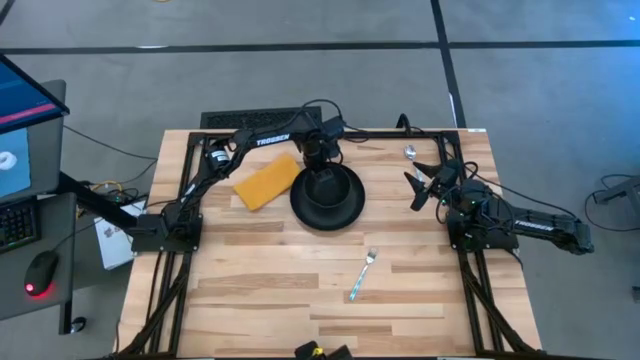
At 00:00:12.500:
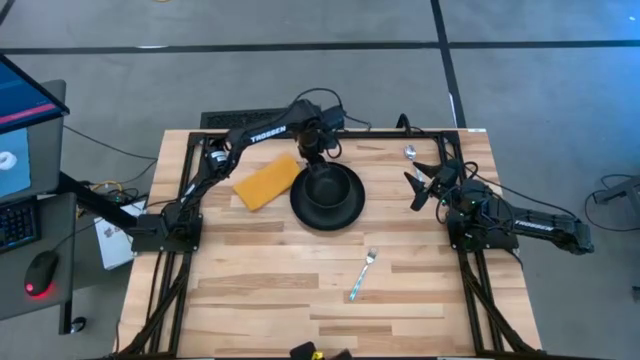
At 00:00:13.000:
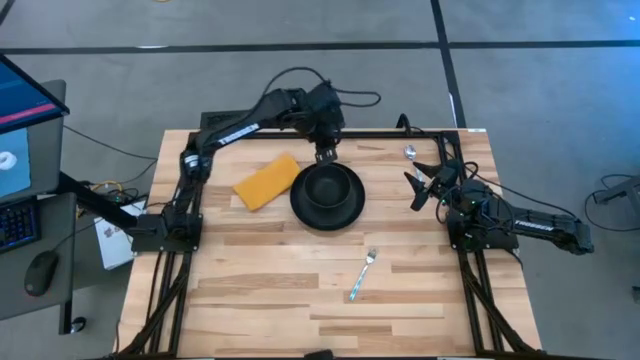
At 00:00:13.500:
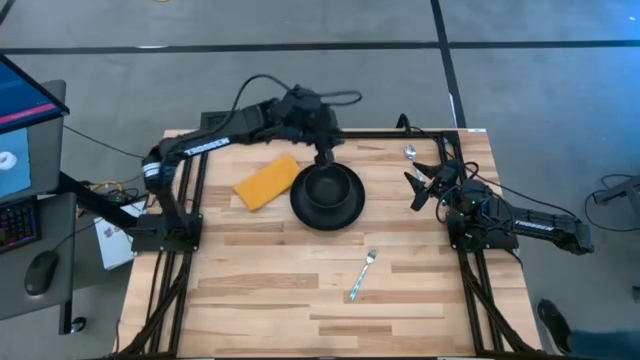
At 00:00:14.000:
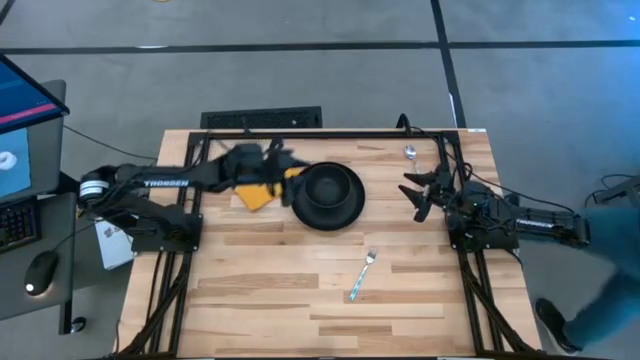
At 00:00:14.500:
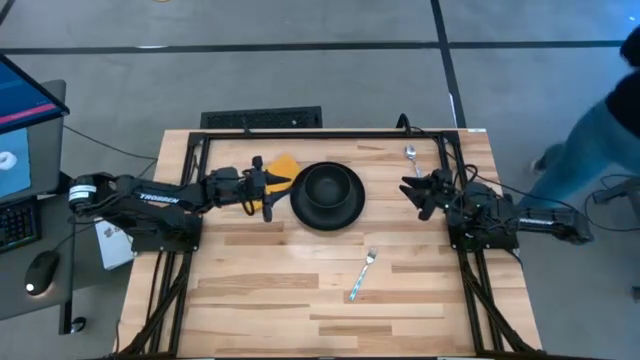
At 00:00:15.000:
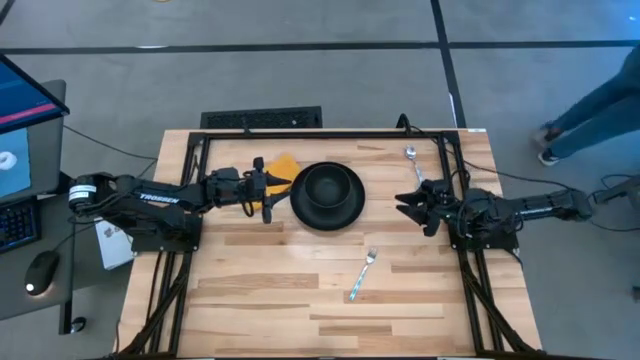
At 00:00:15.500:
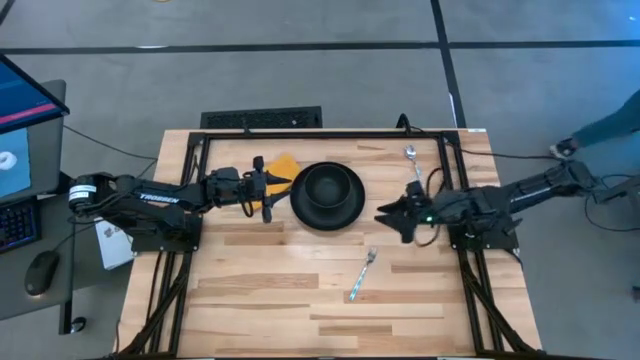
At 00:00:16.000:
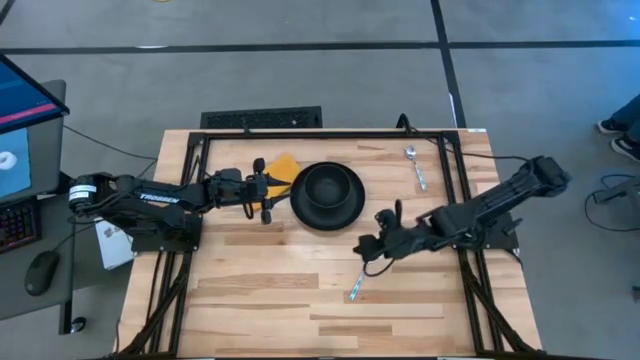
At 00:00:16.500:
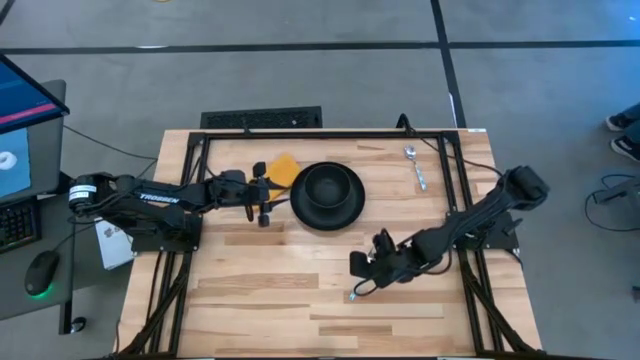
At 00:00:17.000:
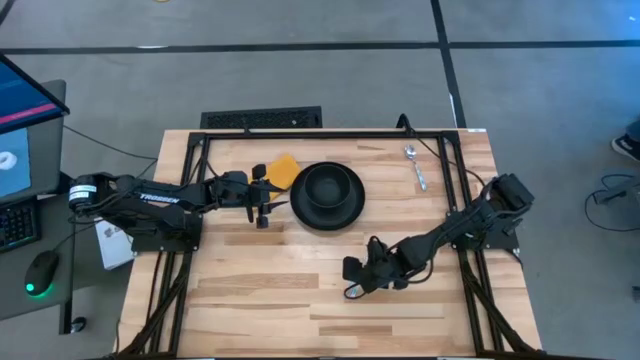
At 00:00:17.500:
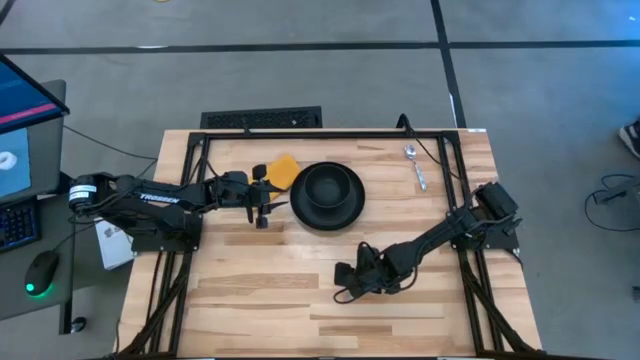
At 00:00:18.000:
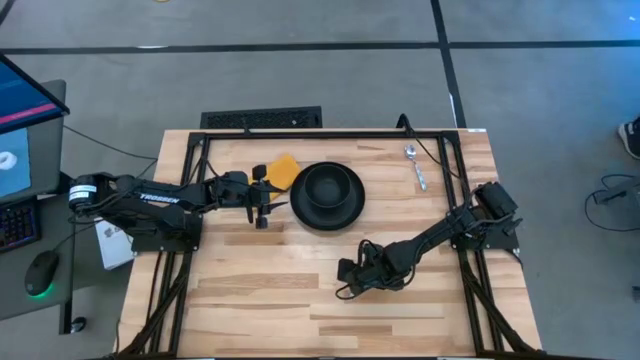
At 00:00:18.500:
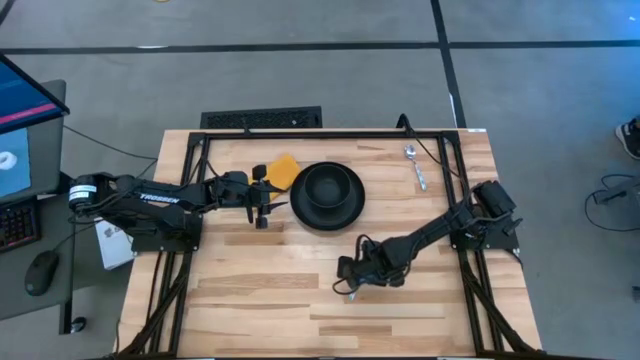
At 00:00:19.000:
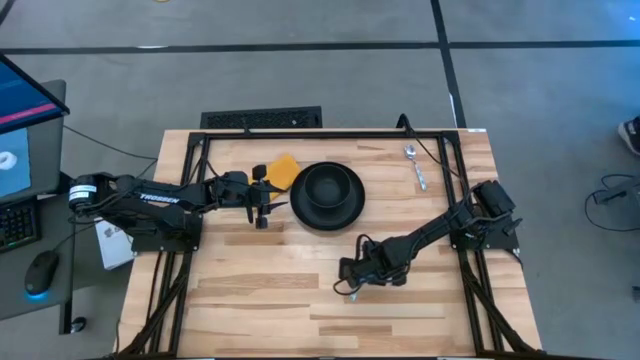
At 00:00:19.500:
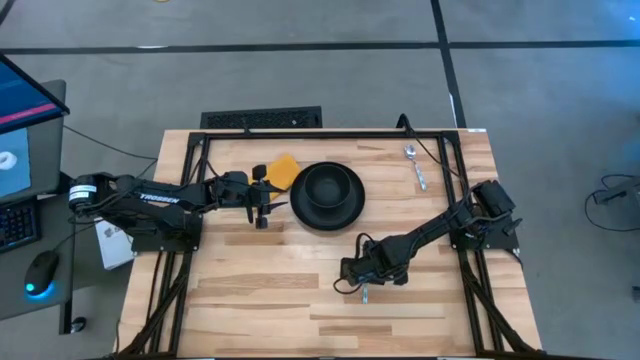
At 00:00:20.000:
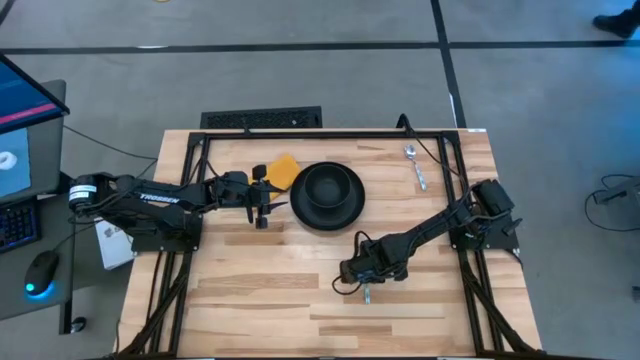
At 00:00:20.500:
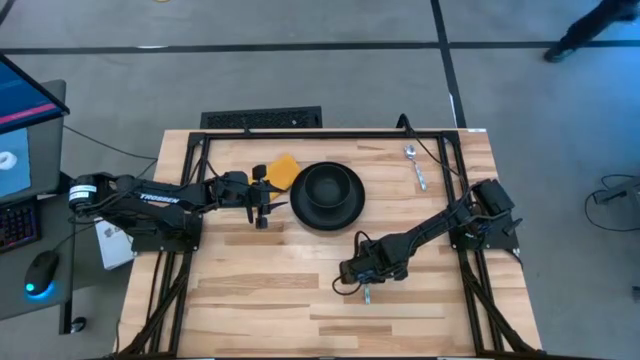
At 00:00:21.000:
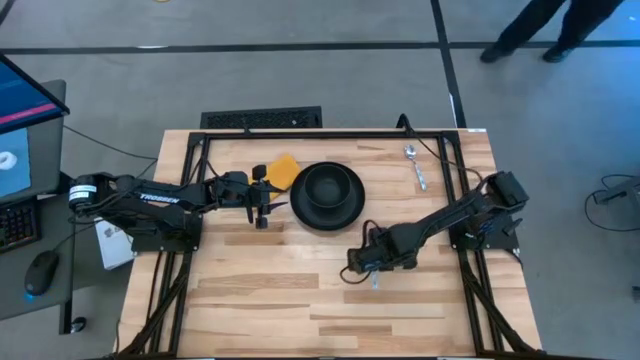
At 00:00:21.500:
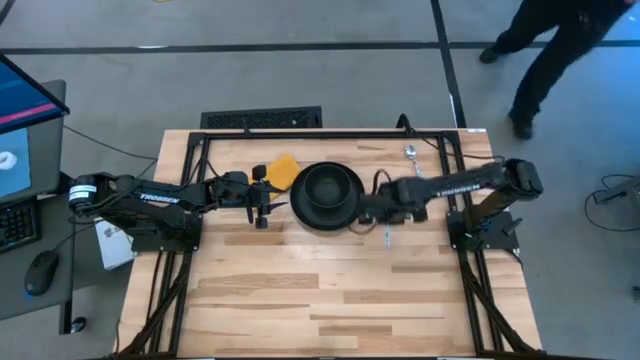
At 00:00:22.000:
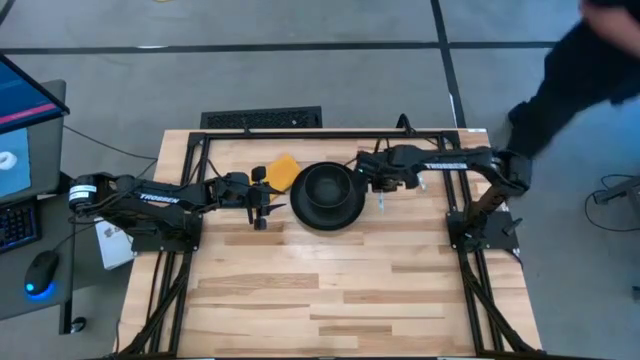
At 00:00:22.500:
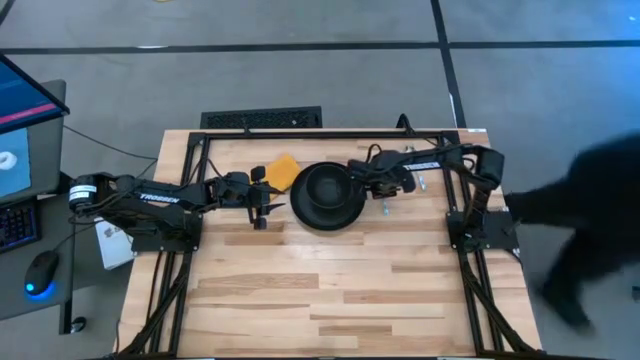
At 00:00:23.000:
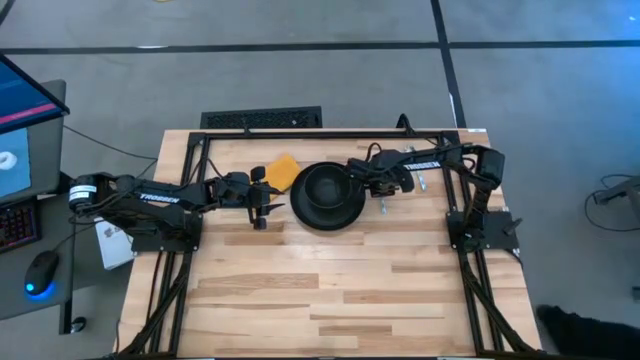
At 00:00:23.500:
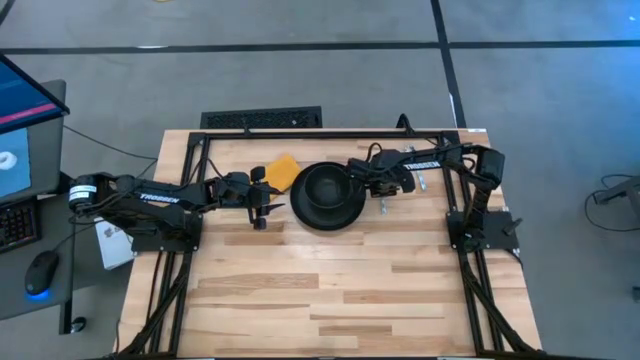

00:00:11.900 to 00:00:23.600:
Task: Set table place
Put the fork to the right of the black plate

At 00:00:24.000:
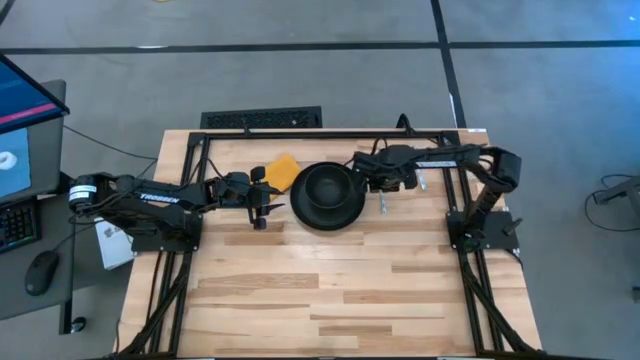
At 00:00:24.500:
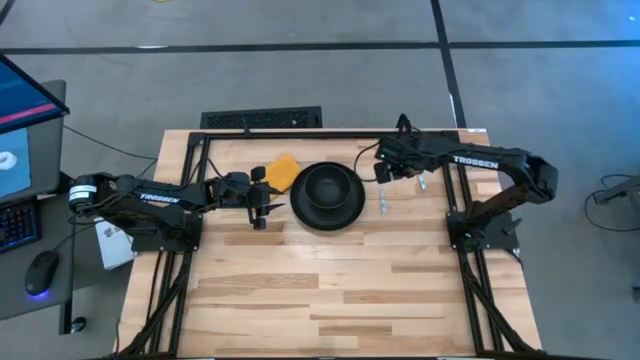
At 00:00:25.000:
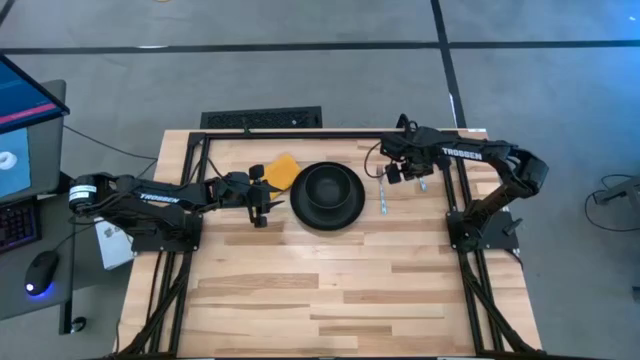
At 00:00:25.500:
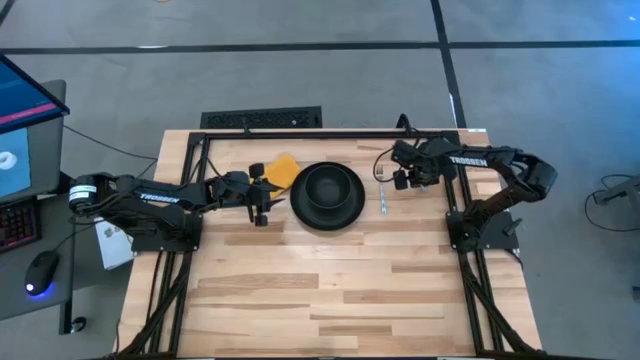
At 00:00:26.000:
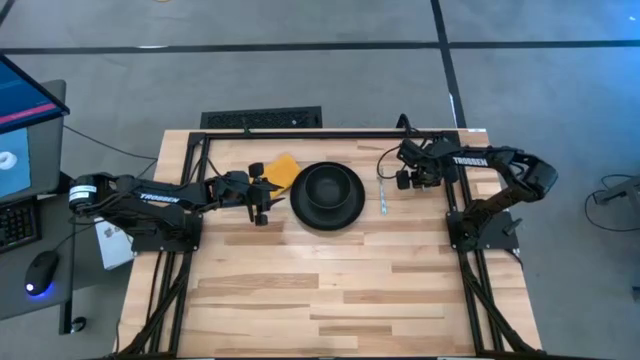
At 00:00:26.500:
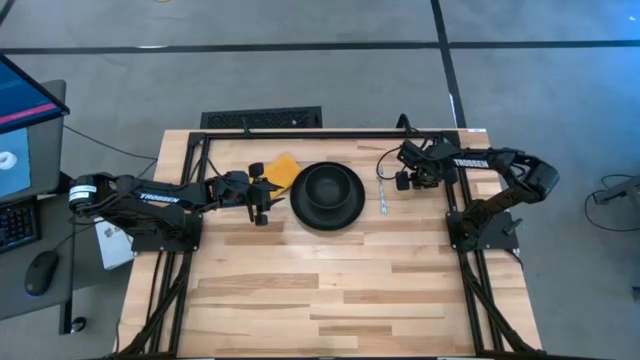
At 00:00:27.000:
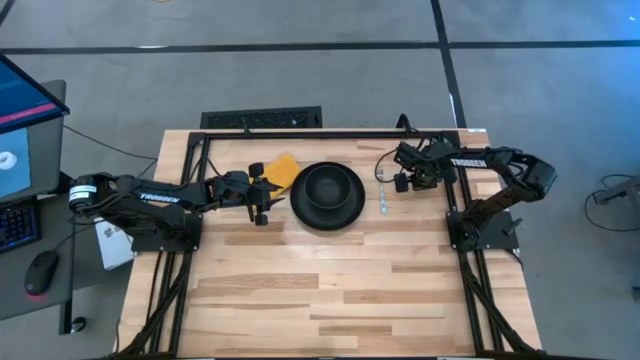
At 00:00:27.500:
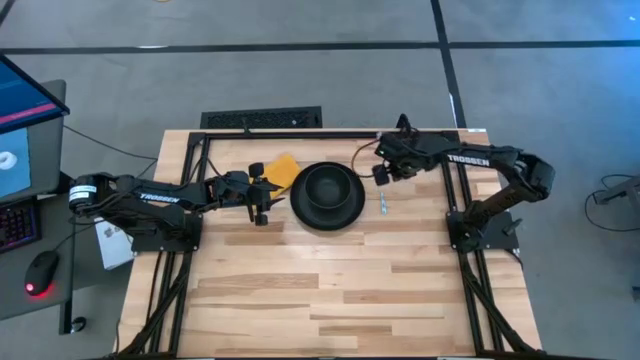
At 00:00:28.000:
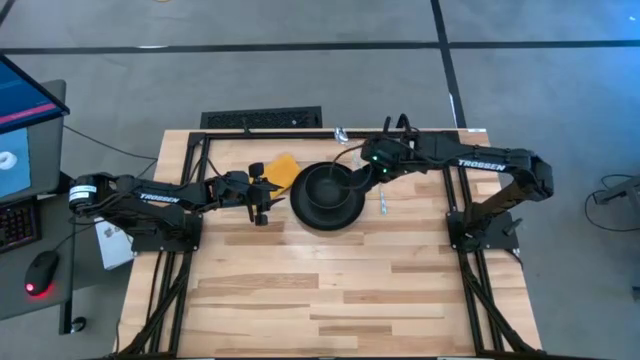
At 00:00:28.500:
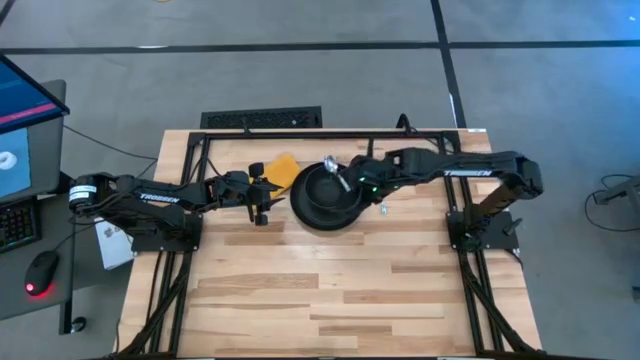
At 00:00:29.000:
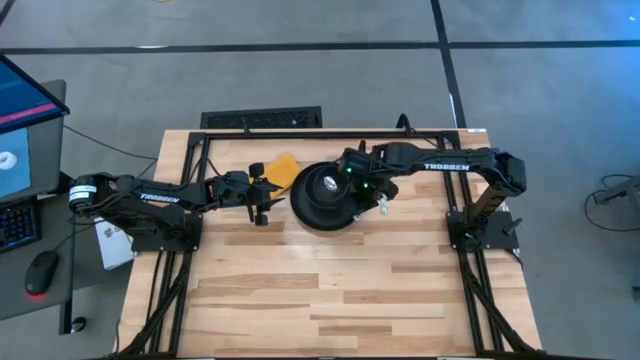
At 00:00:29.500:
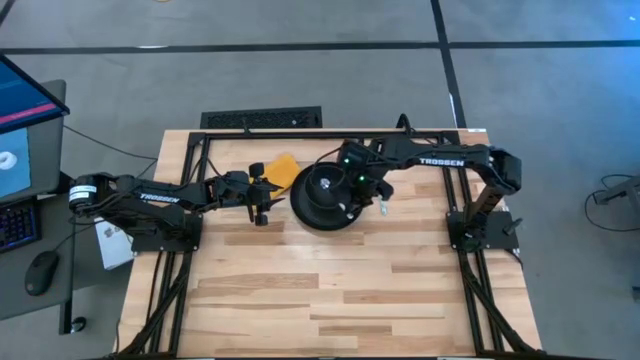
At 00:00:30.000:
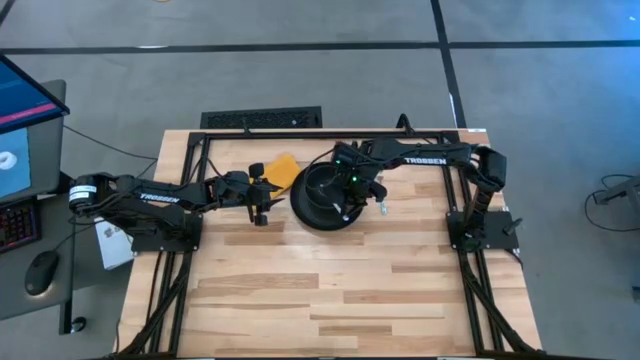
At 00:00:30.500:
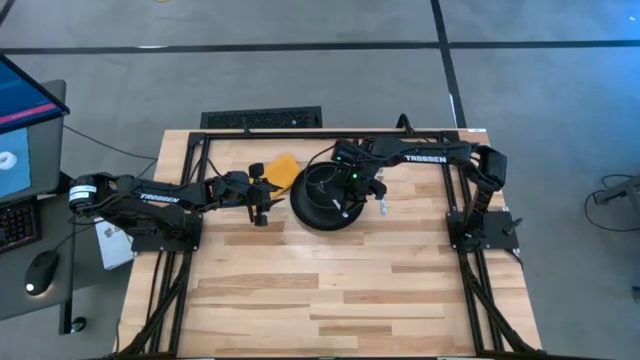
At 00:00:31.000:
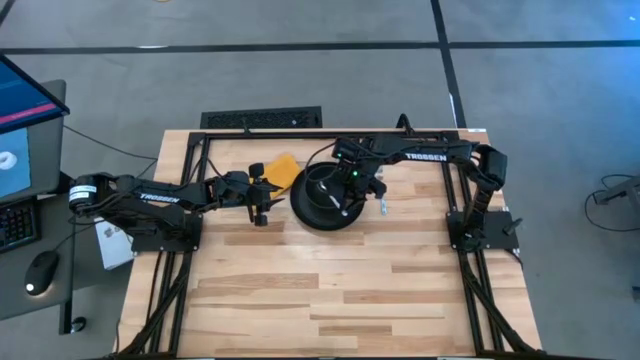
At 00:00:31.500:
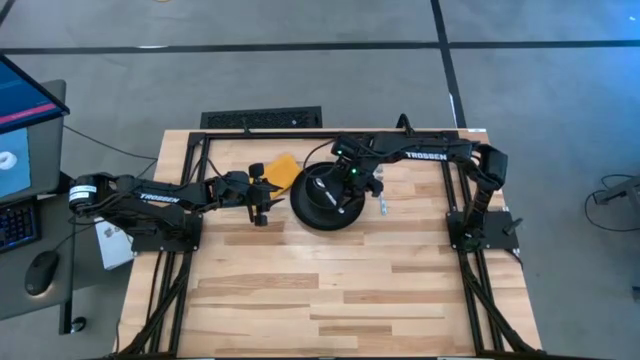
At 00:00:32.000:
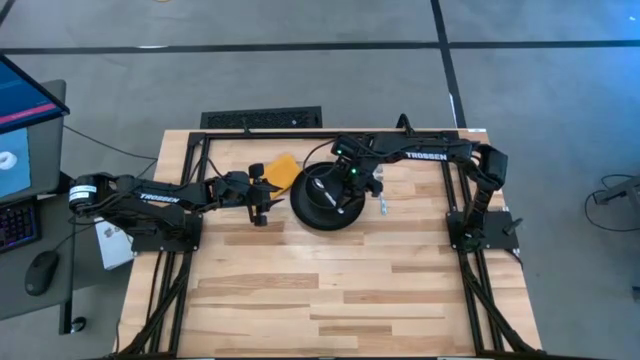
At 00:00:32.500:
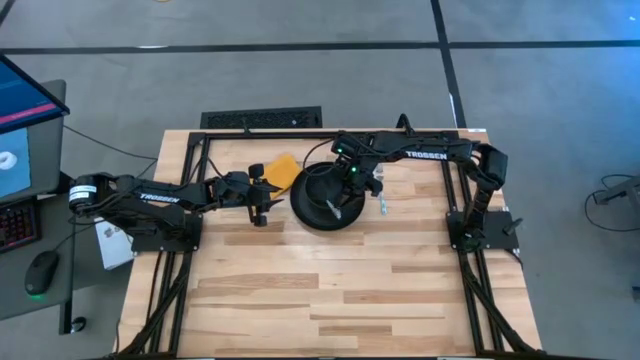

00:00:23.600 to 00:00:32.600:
Put the spoon into the black bowl
